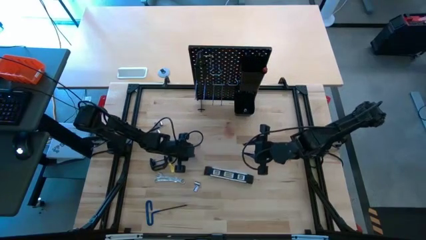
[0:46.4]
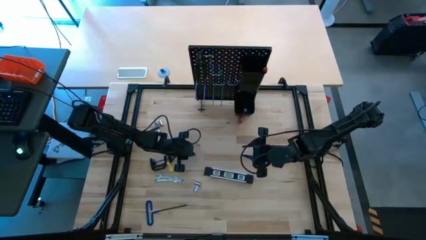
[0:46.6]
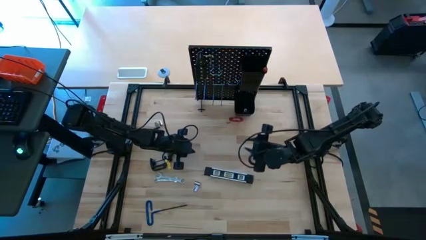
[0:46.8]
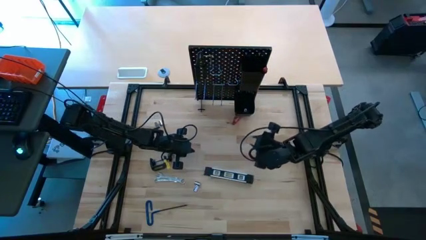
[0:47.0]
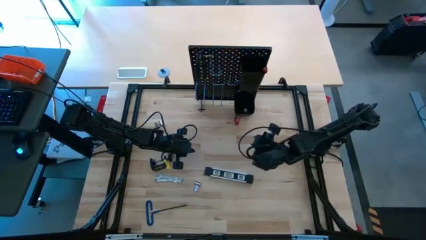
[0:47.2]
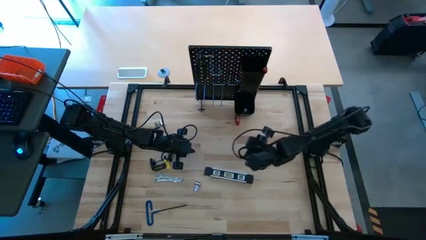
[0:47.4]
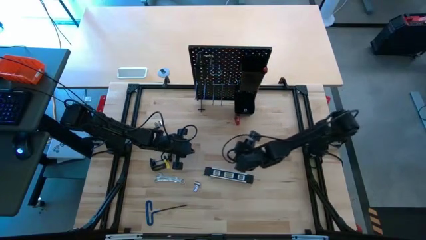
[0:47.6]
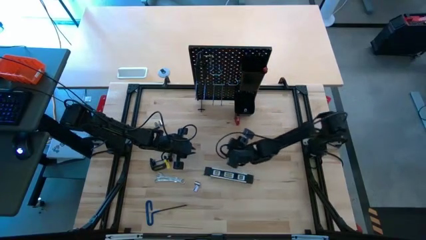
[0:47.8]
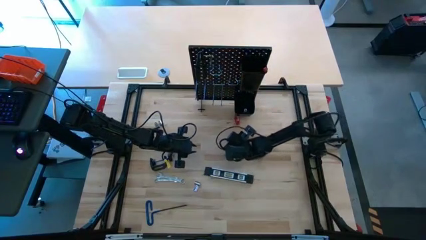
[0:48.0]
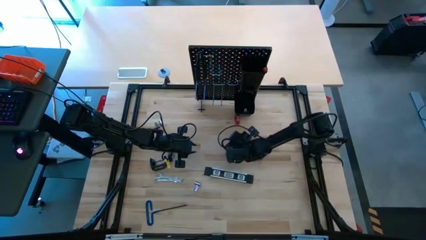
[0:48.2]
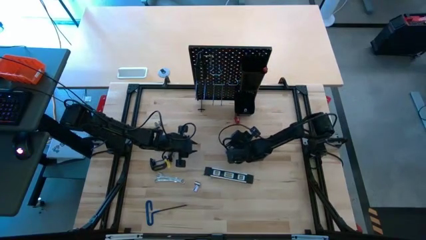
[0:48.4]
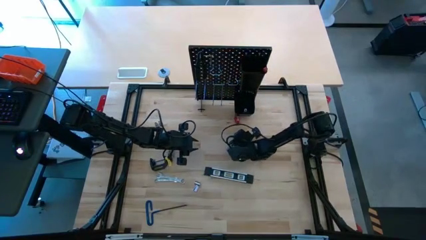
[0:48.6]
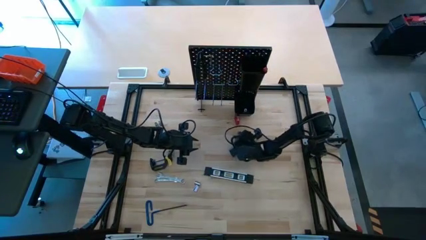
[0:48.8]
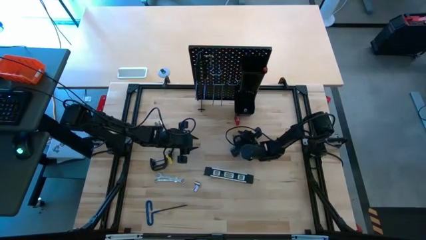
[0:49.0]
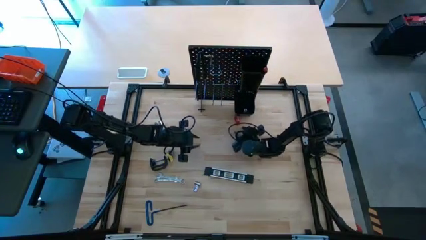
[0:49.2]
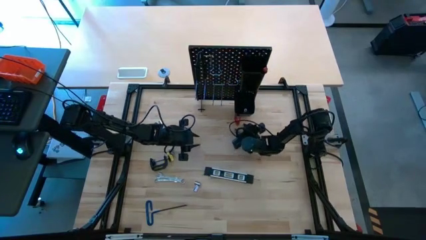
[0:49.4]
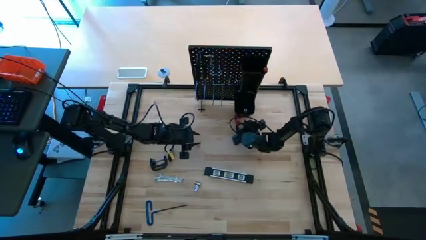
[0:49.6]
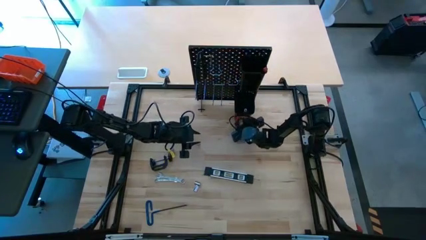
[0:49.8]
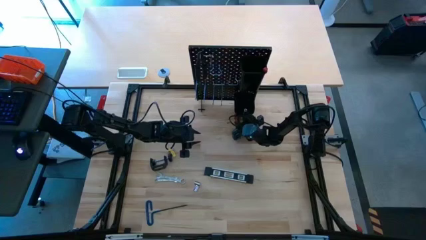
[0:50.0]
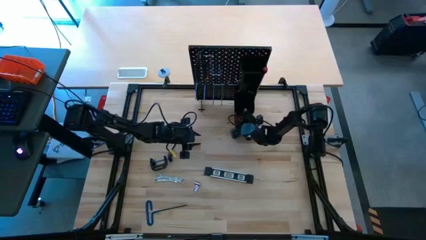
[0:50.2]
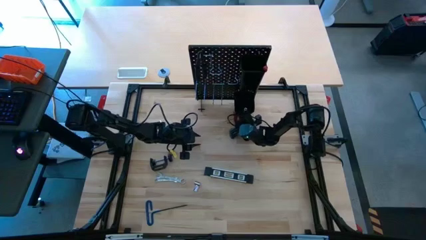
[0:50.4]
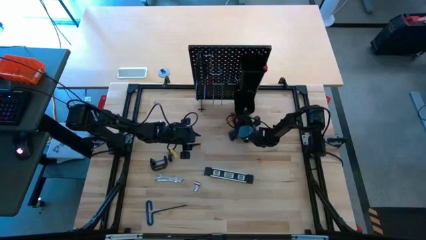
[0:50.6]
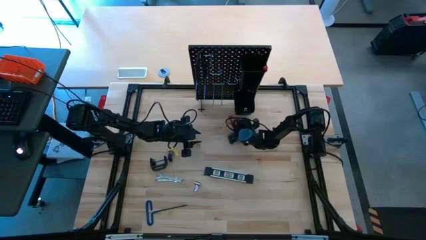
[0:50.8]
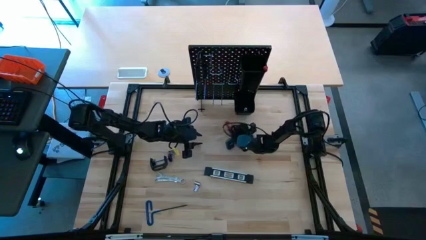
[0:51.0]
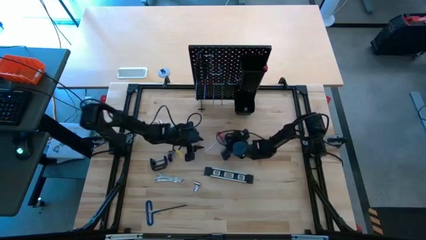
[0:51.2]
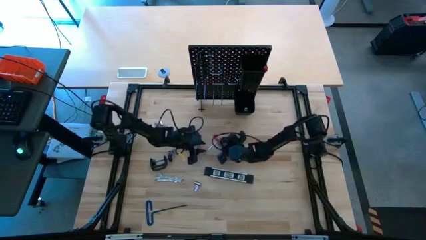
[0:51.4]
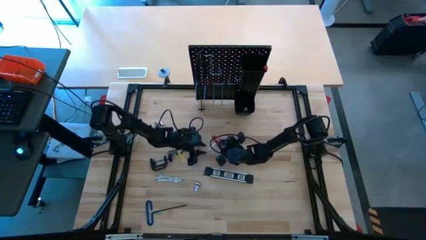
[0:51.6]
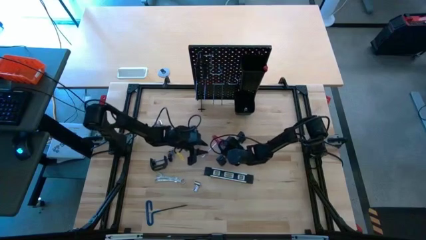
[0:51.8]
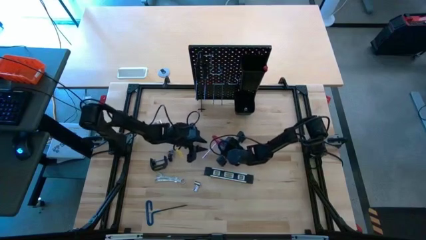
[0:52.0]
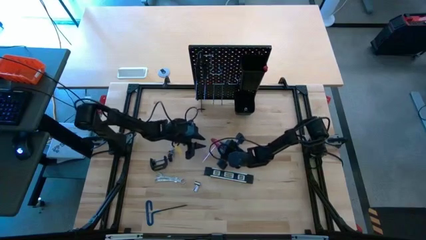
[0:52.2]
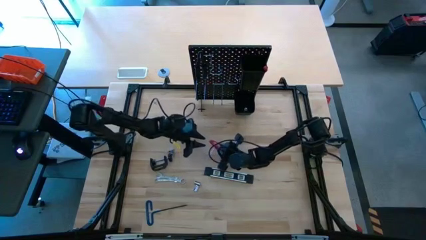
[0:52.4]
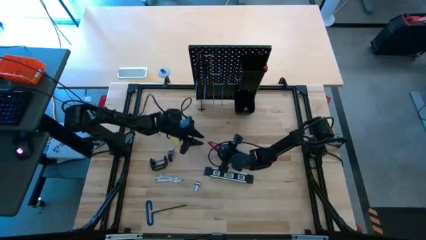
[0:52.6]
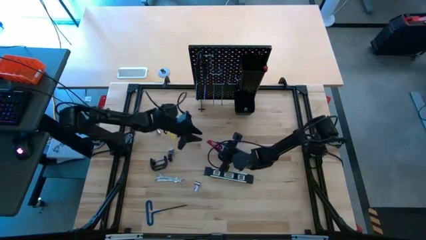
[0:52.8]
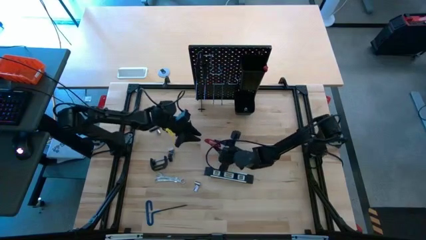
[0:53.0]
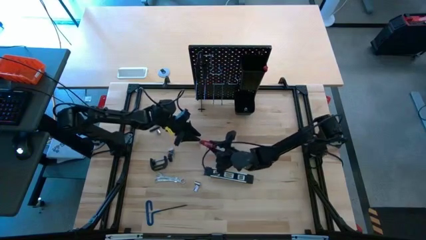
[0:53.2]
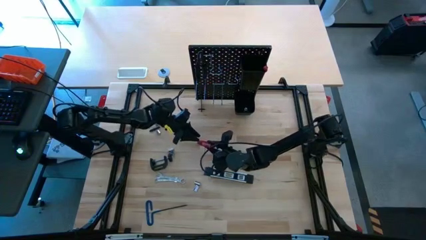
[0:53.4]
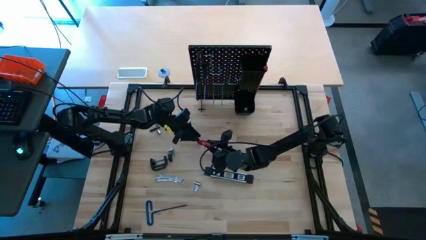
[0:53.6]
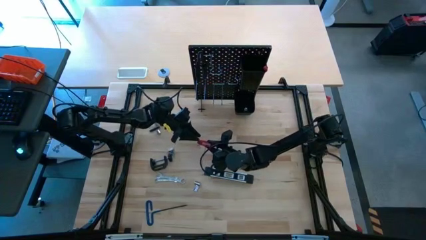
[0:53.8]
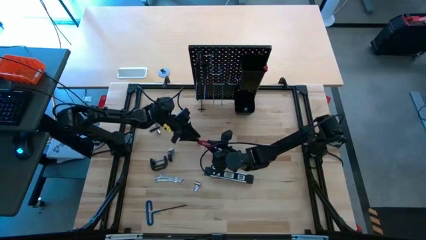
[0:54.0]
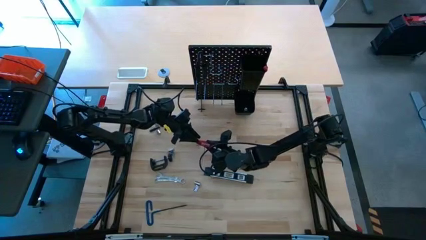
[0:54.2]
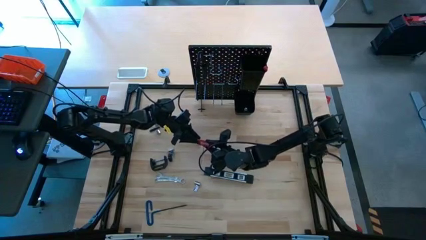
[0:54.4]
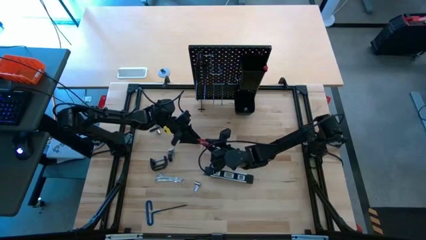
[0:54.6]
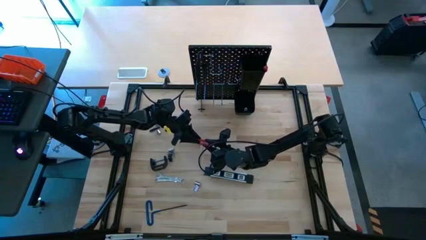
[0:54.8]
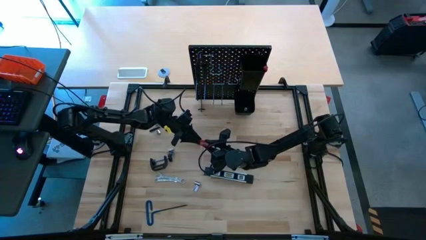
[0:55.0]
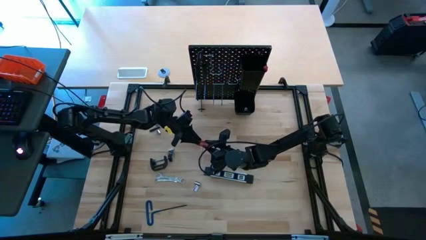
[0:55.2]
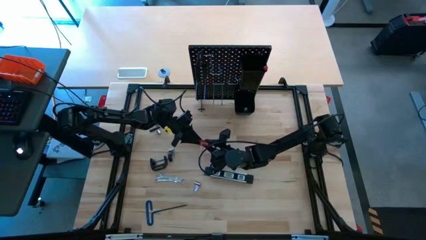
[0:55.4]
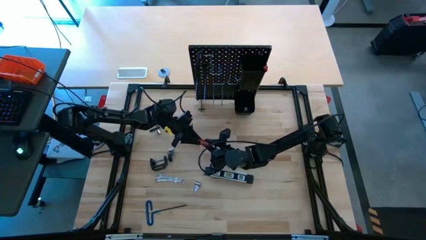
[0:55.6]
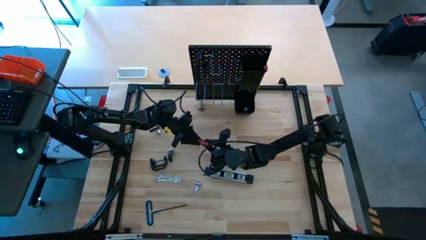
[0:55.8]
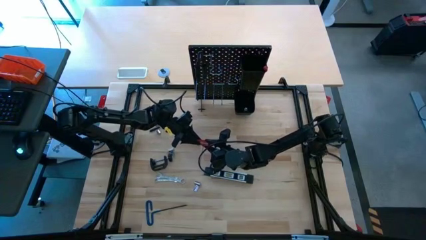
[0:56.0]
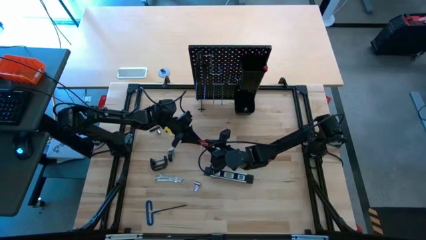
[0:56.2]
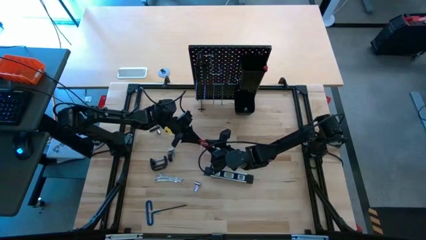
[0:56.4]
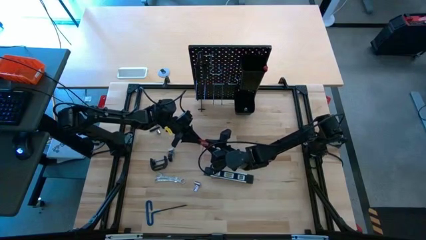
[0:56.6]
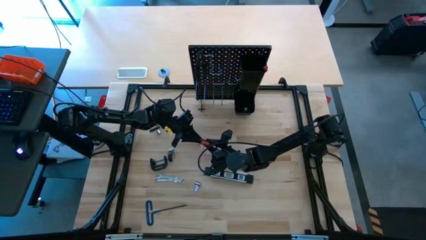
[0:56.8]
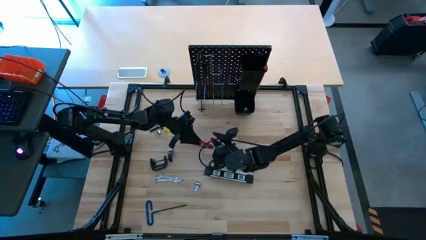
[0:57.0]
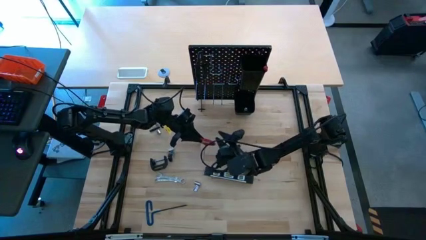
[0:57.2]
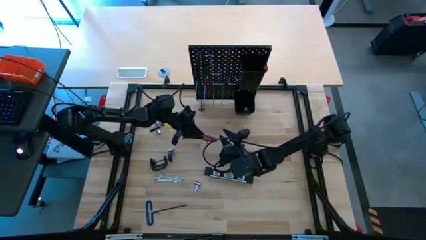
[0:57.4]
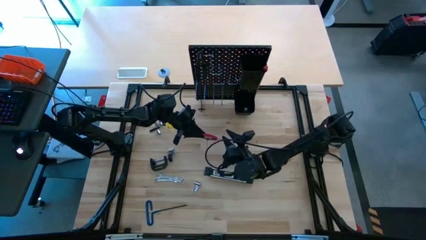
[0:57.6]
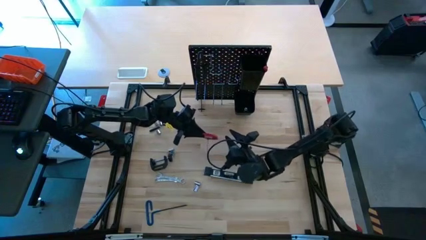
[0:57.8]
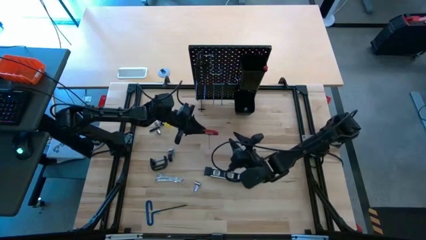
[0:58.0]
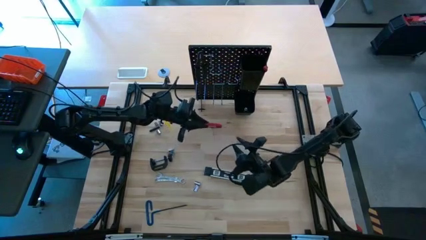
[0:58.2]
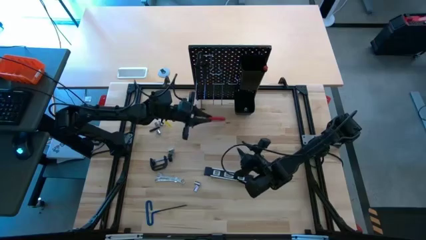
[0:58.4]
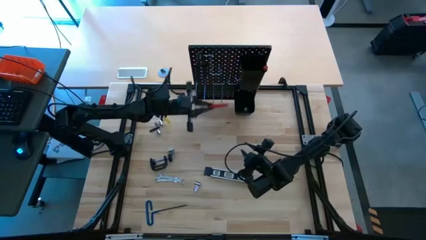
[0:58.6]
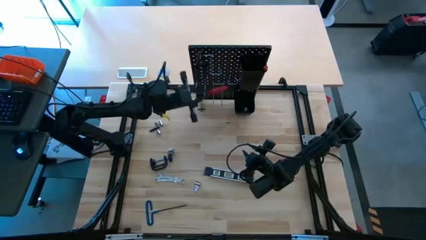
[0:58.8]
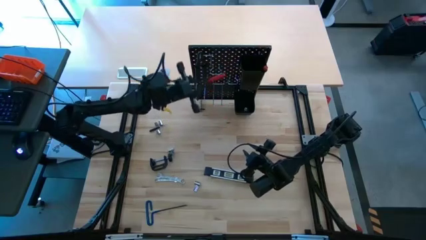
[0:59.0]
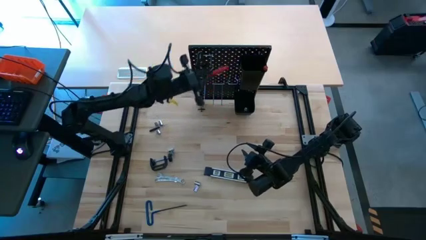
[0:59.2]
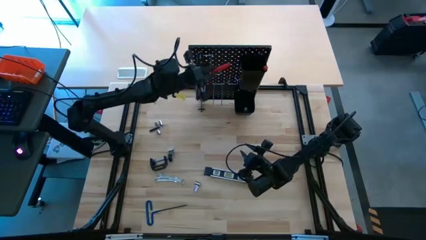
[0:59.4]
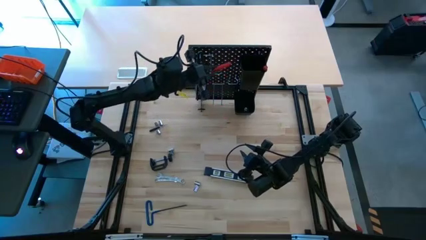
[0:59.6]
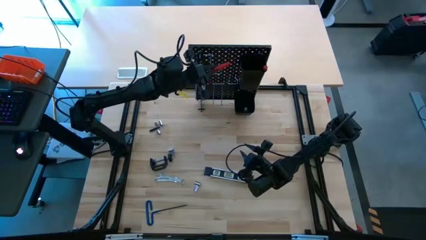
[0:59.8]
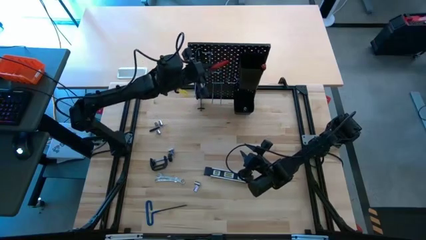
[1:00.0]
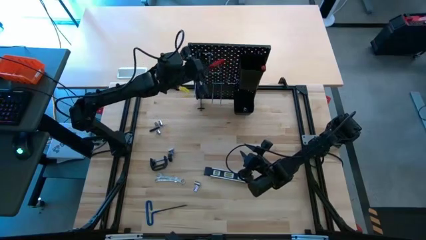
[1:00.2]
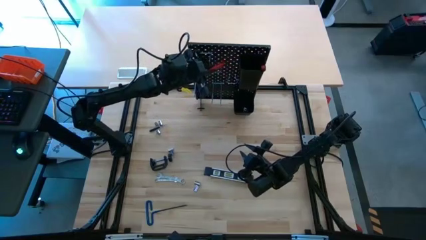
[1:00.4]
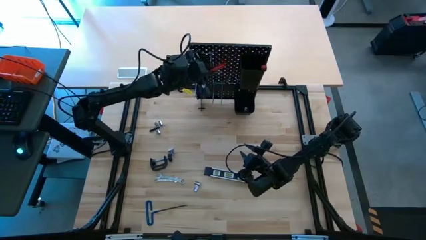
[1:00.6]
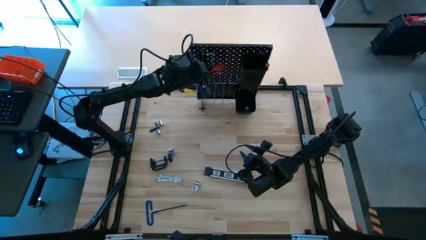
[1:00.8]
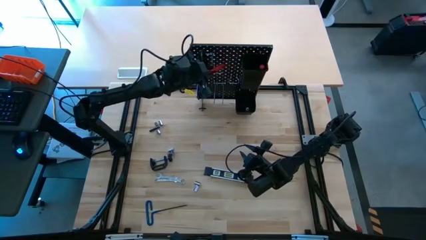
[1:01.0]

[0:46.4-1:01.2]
Task: Hang tools onto peg board
Hang the allen wrench on the peg board
